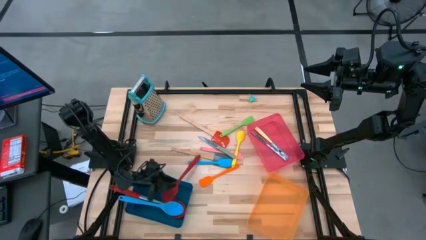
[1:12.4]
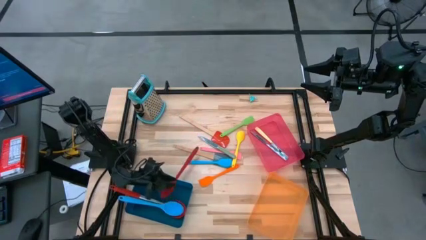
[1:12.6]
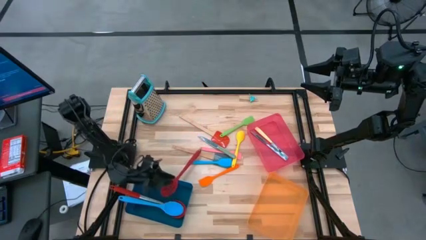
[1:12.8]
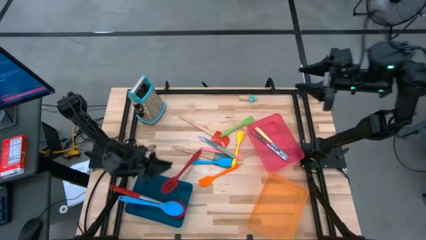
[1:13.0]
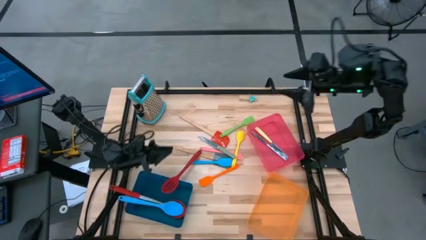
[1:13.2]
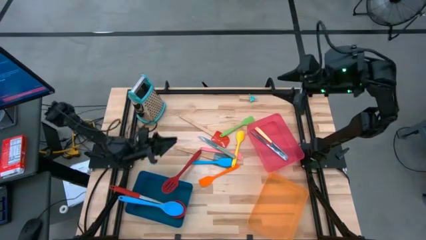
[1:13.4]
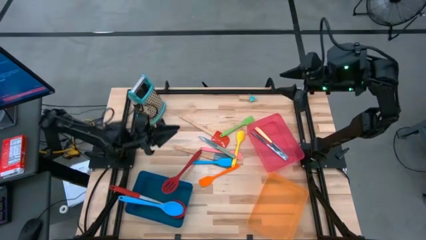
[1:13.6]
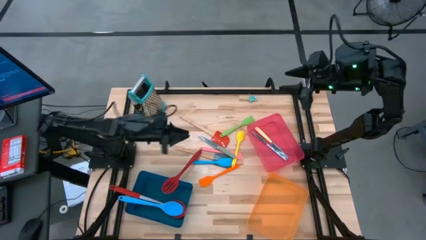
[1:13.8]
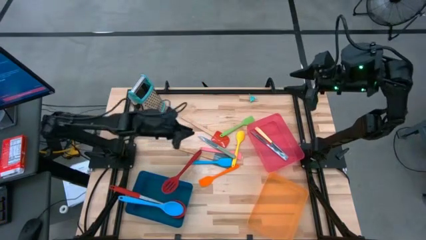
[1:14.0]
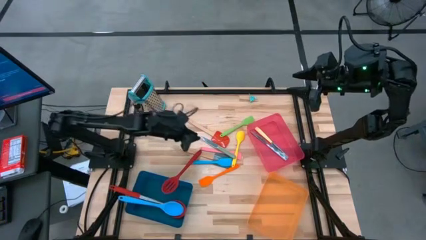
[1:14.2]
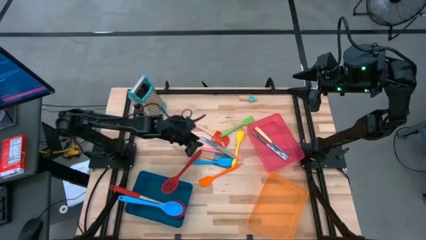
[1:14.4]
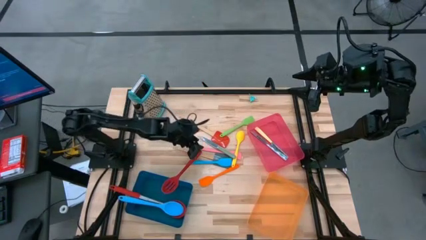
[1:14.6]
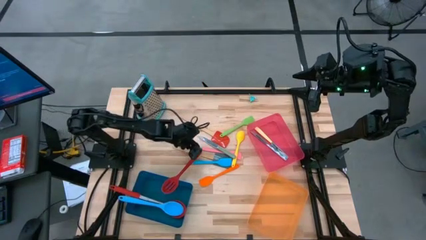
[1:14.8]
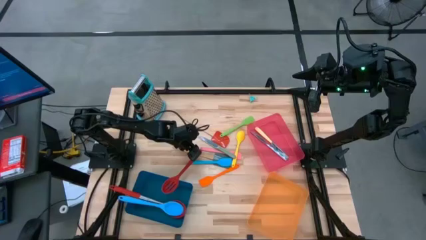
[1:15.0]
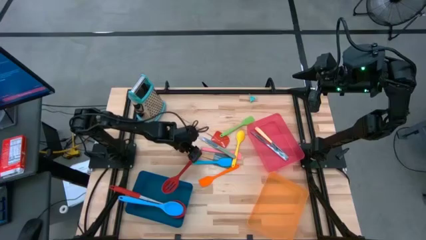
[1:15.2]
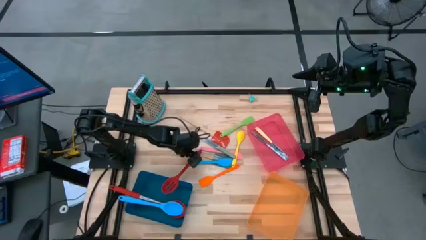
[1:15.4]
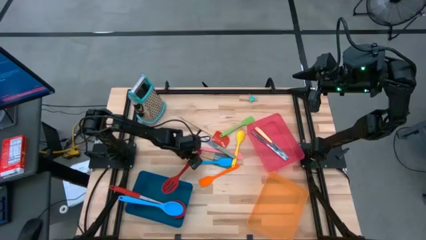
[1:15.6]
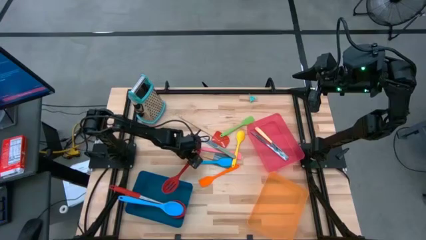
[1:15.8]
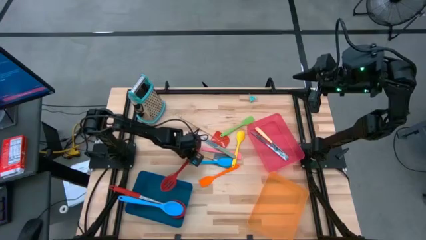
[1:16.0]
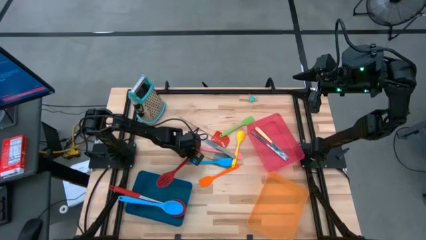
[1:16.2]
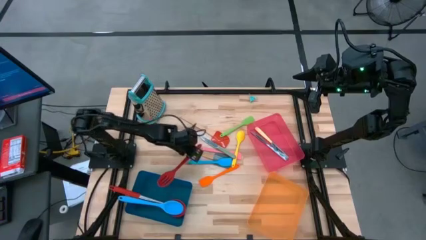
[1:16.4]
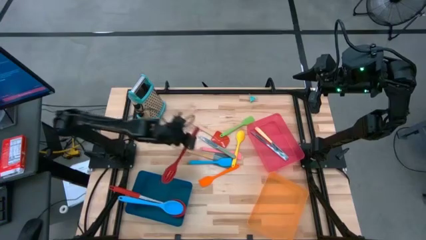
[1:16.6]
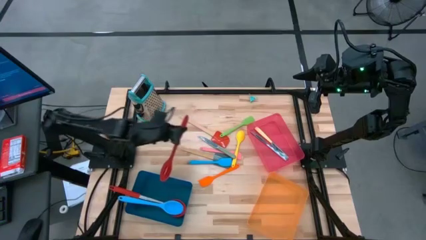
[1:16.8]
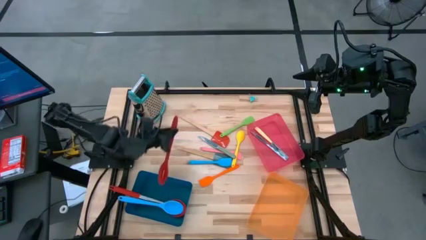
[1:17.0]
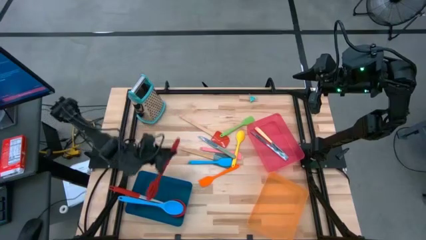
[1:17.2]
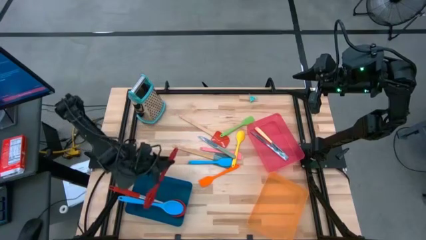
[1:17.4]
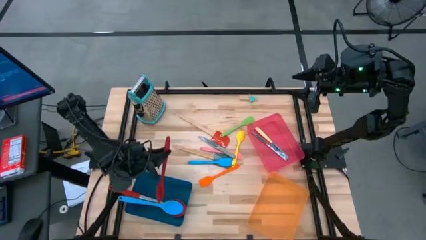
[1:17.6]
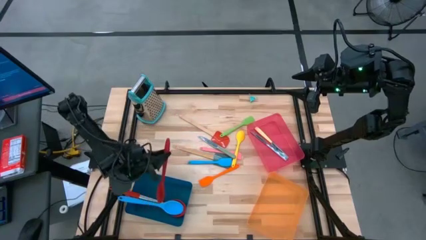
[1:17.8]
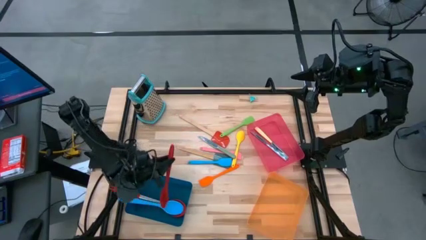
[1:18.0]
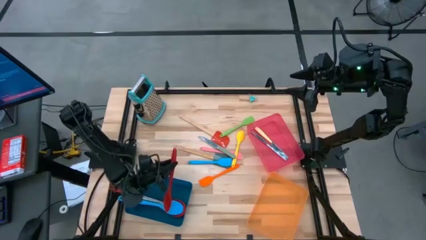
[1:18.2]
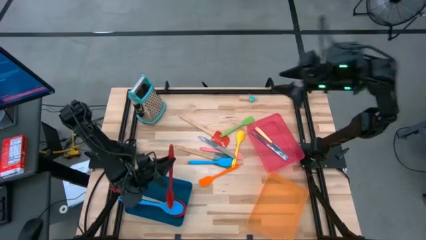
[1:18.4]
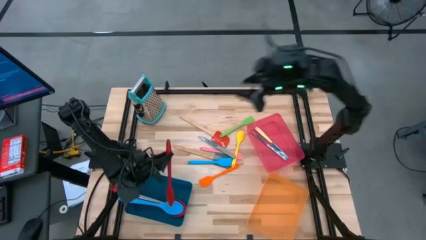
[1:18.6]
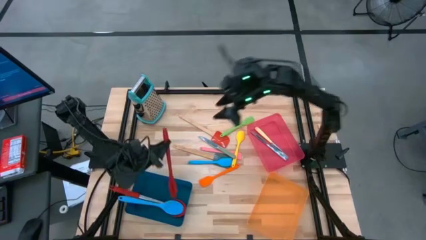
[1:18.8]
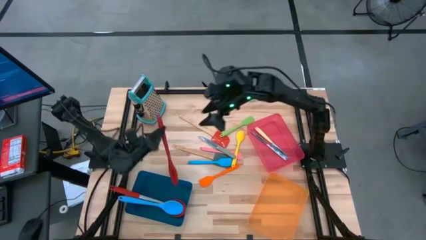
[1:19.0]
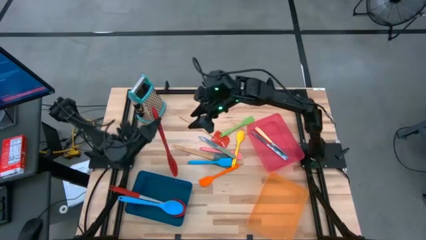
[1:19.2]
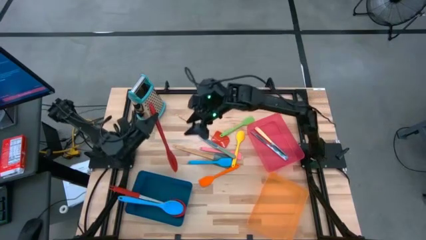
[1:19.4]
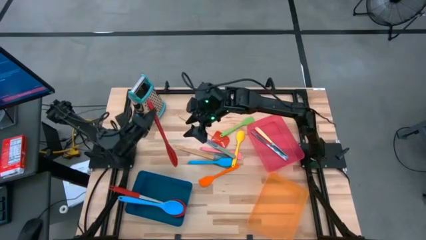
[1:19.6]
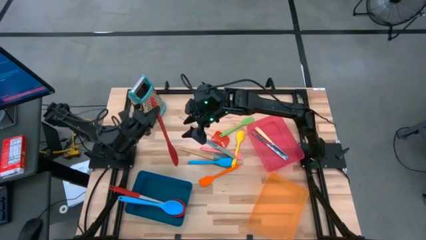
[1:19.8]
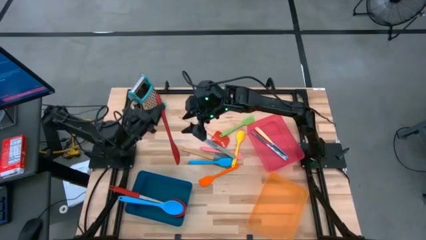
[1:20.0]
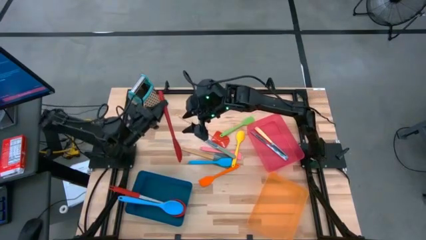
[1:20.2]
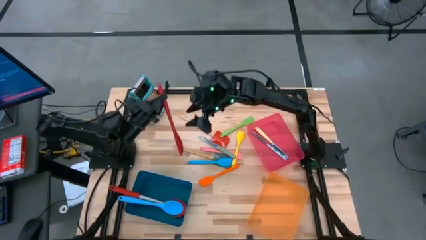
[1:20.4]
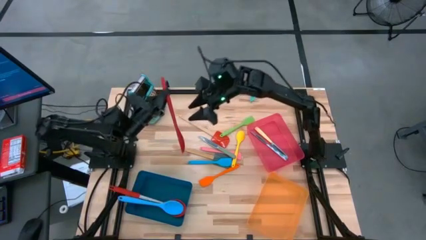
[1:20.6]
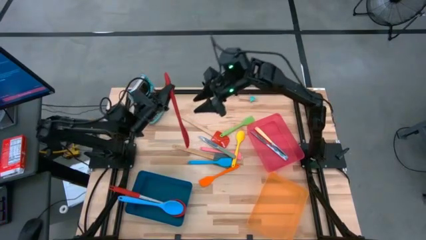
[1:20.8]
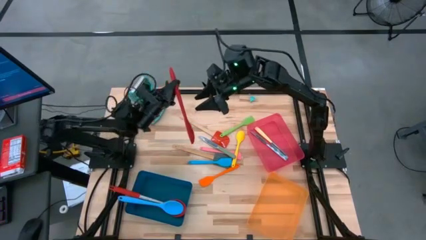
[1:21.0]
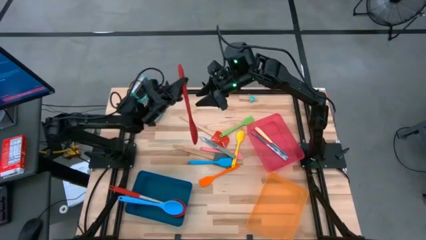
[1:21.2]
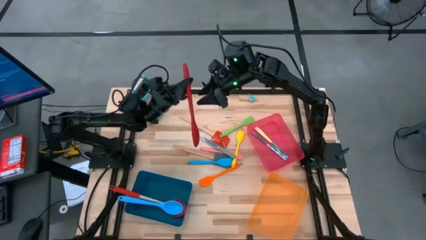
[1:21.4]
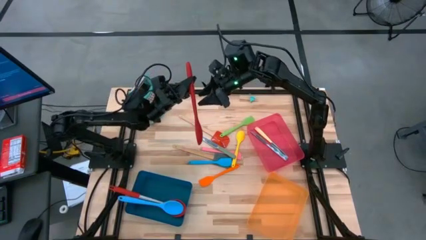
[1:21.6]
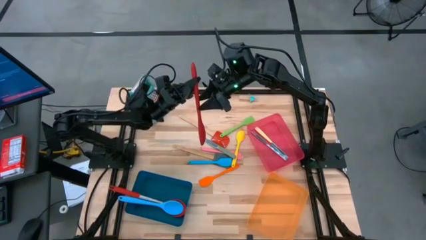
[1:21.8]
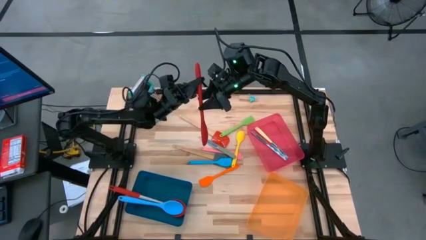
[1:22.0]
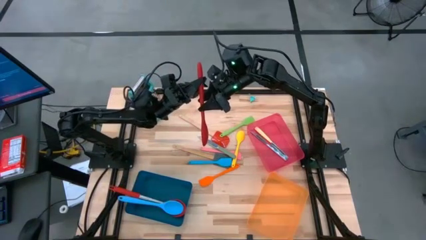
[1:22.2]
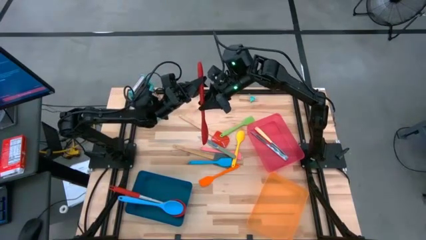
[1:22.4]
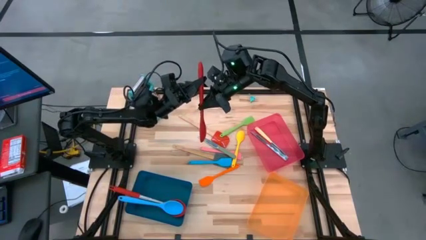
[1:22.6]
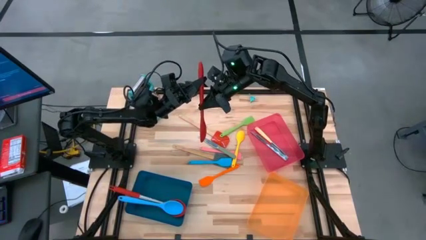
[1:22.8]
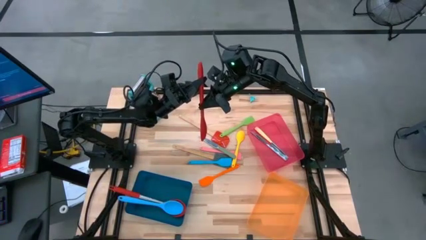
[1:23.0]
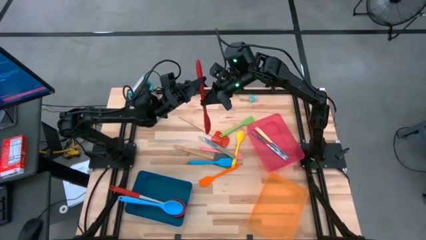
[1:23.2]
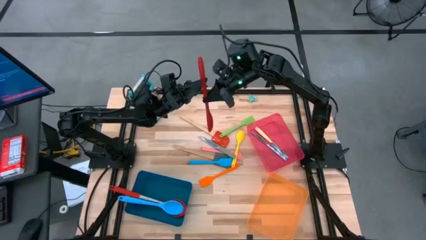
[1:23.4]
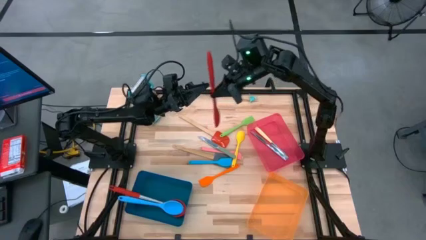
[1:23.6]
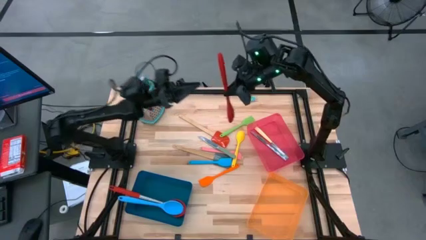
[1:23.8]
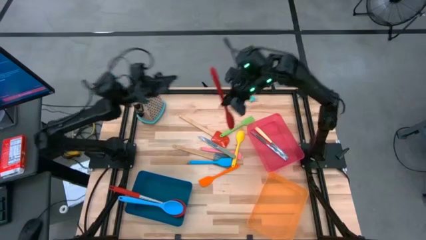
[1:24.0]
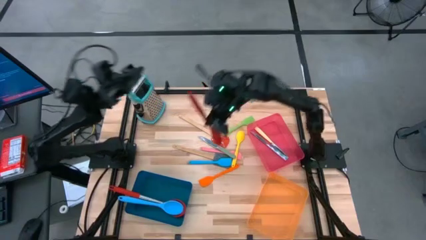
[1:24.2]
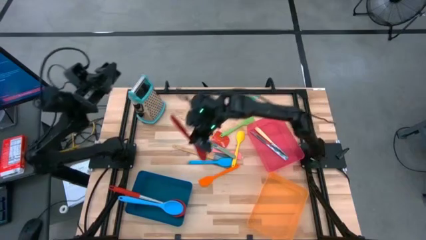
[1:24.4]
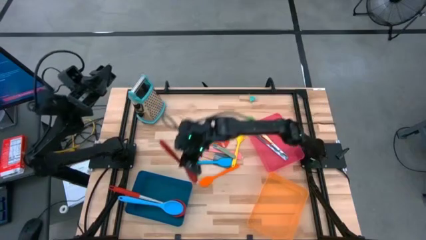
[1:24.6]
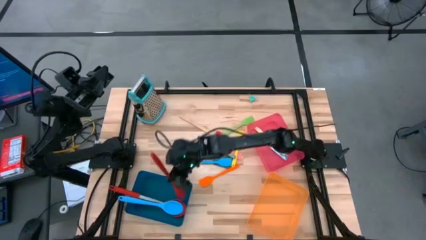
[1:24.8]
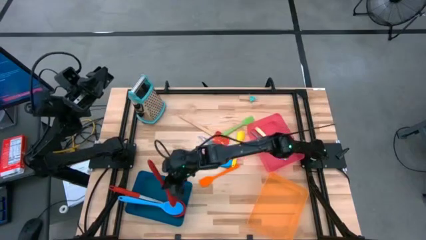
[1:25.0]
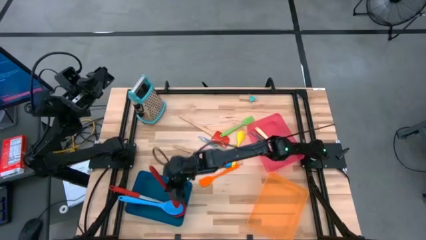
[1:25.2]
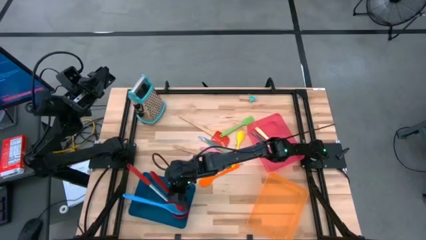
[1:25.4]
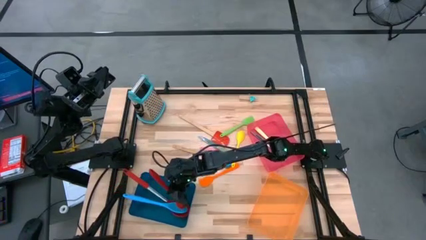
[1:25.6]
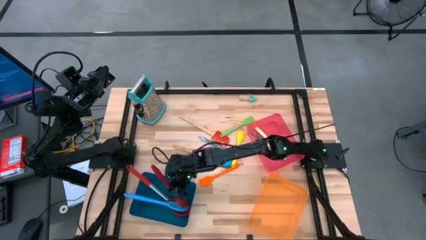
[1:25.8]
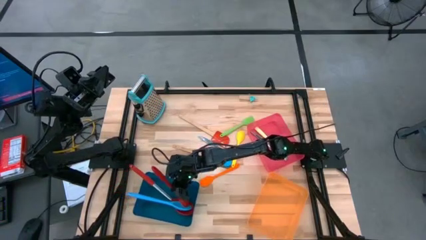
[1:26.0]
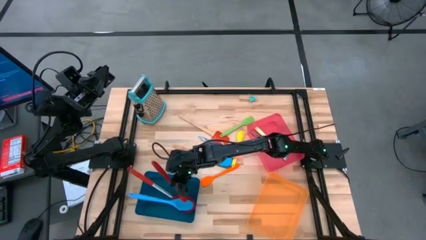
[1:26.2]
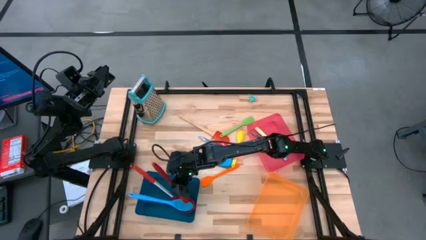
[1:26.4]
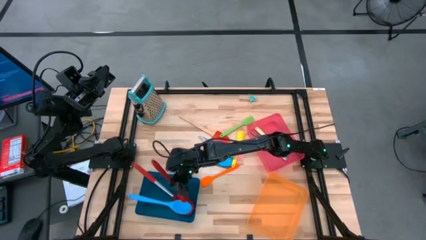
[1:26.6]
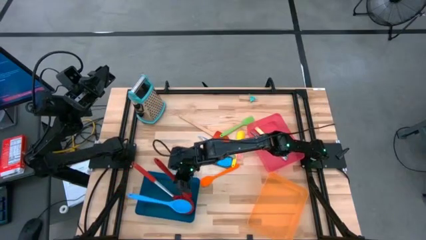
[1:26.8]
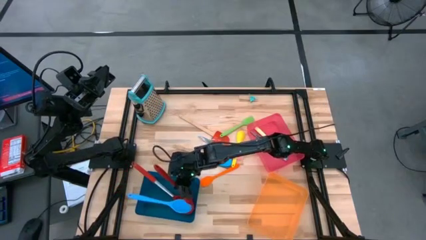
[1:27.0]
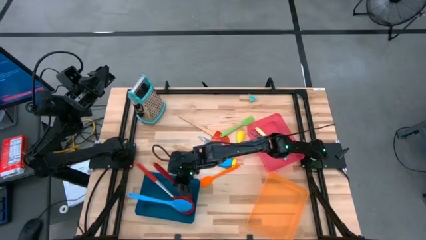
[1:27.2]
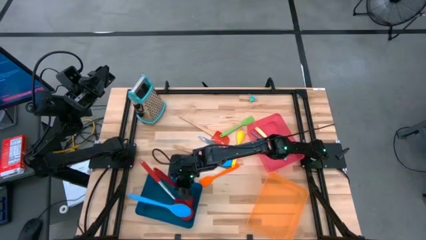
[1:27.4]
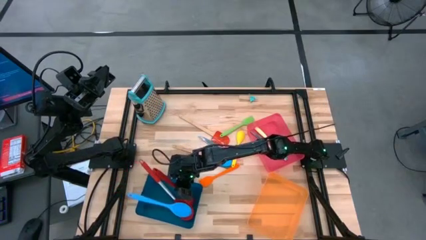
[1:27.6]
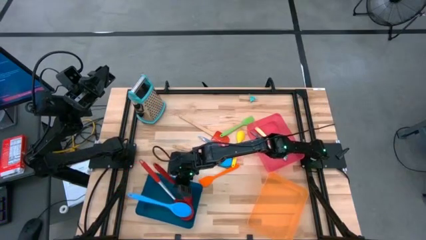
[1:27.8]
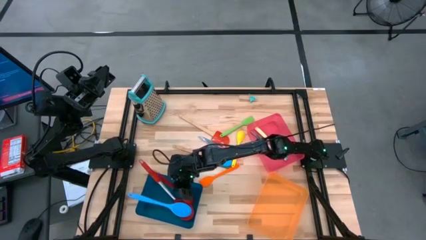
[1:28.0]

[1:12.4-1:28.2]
Task: Pick & Place Kitchen Items
Put the red serving spoon into the blue bin
